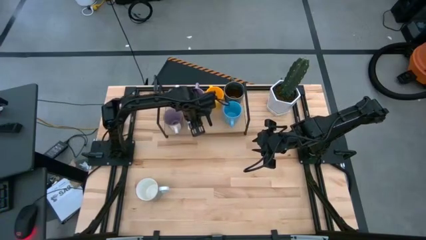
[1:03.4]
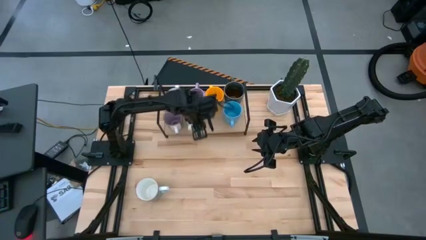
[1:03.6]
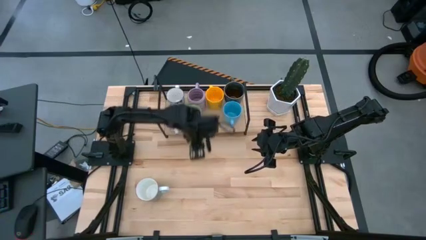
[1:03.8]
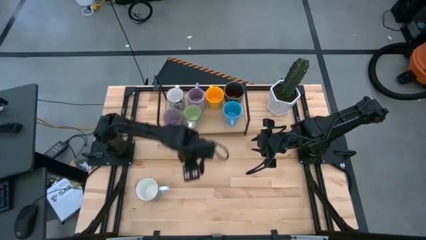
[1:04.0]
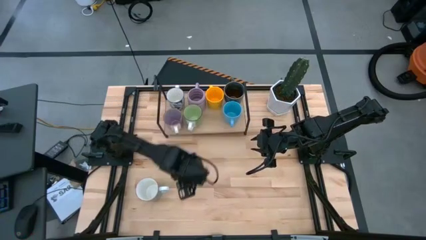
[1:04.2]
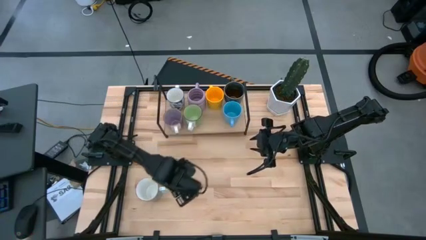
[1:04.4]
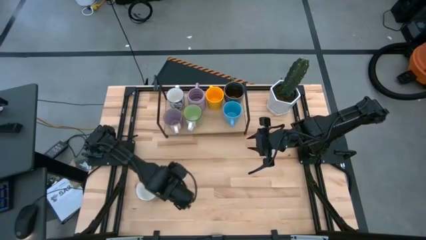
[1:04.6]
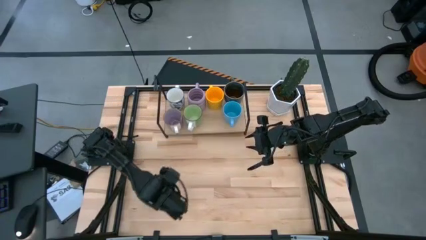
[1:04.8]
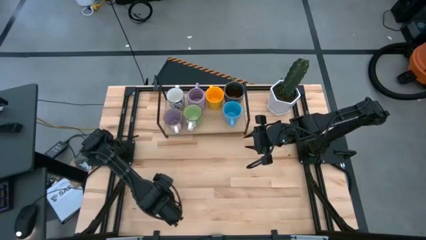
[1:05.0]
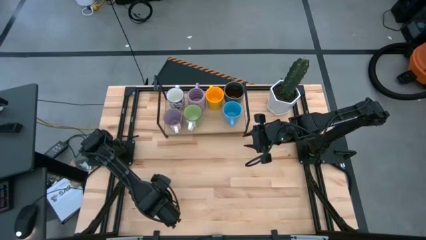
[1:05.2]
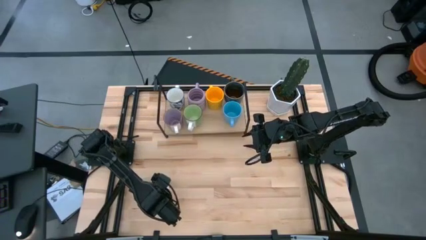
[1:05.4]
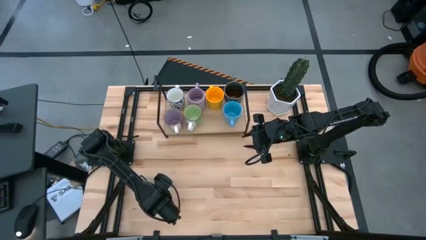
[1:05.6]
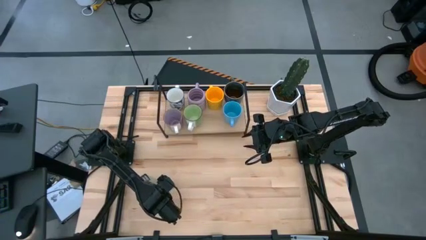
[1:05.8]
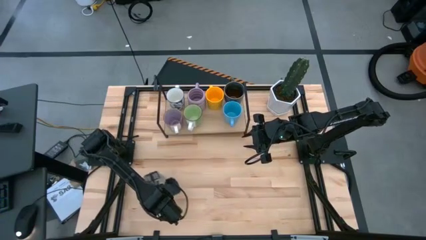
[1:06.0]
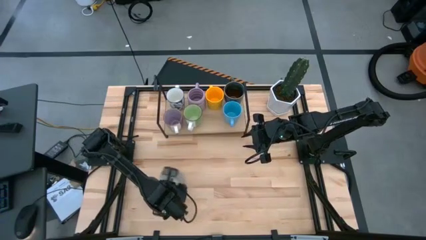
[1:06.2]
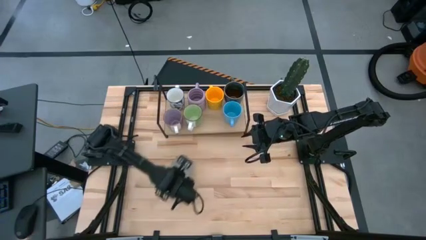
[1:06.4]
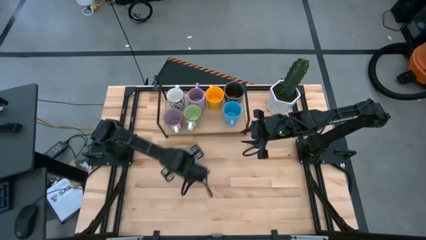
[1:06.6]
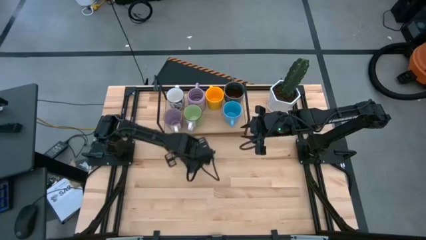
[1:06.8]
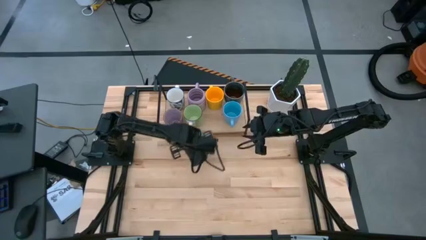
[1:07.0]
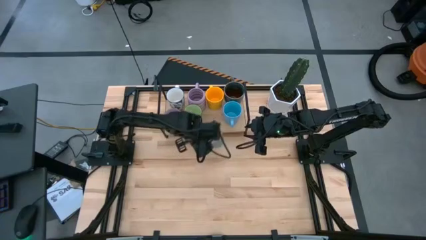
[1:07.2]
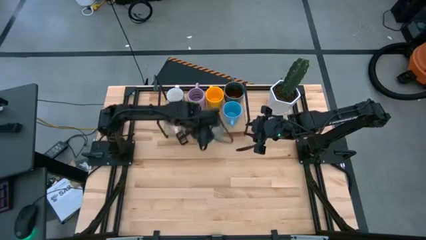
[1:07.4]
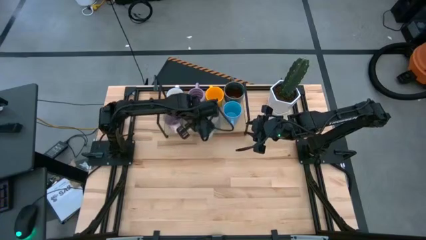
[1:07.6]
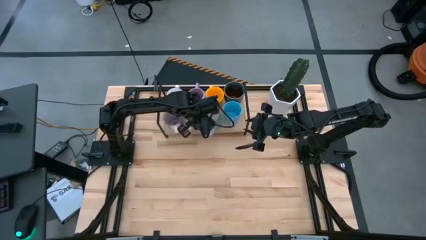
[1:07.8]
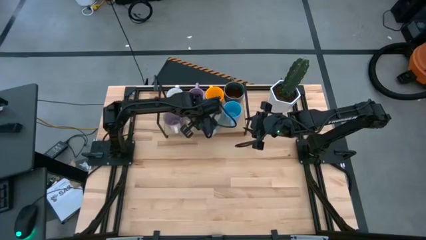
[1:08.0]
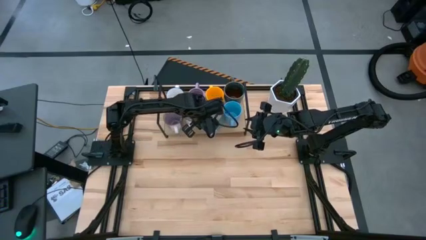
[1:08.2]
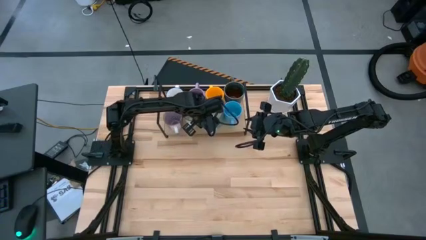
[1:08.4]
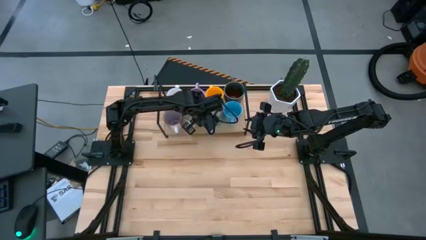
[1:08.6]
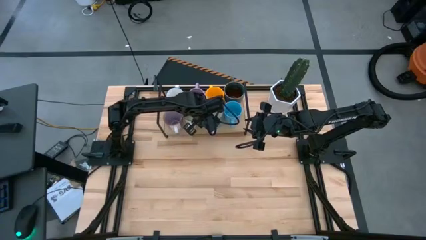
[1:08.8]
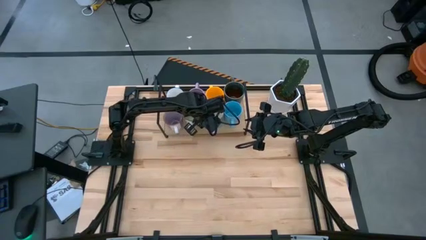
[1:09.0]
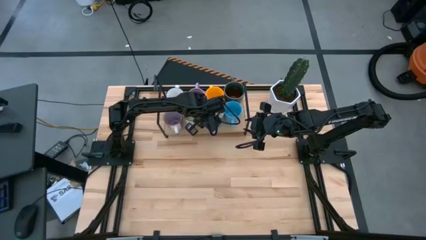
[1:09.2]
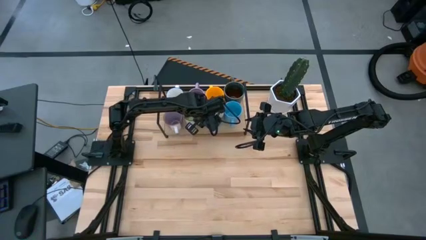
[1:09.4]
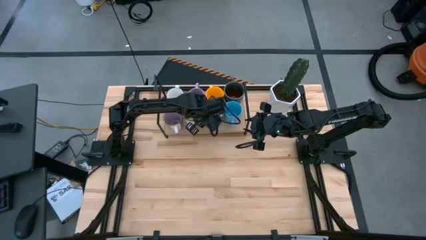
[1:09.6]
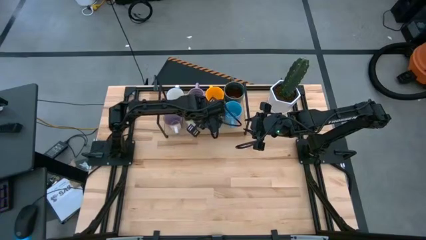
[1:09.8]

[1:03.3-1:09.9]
Task: Place coffee mugs
Put the blue and white mug on the shelf

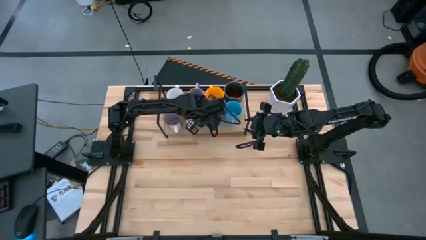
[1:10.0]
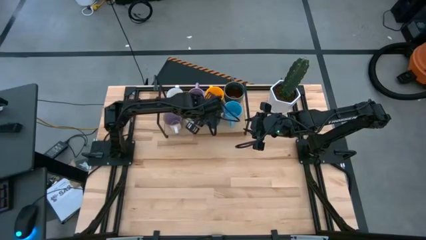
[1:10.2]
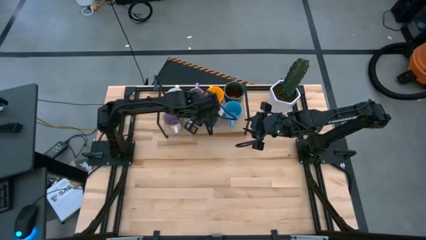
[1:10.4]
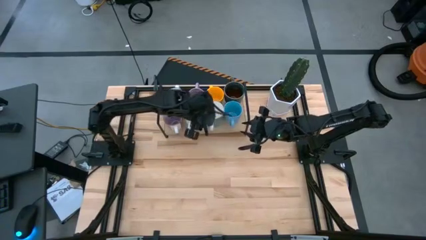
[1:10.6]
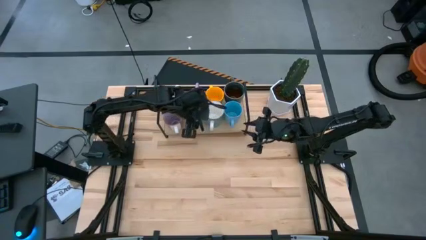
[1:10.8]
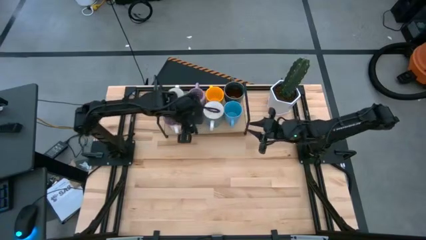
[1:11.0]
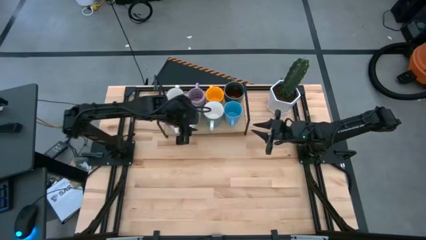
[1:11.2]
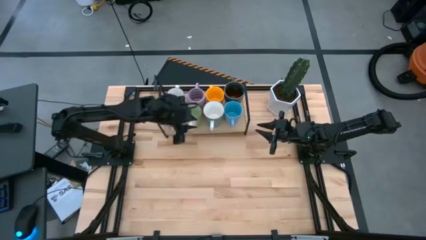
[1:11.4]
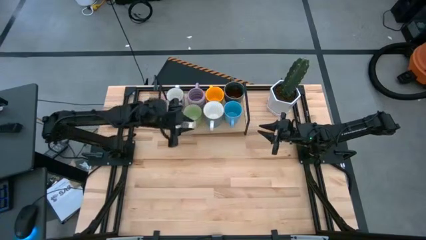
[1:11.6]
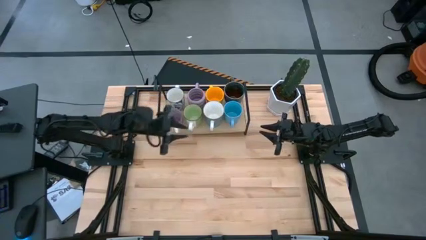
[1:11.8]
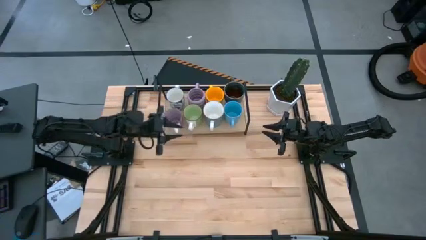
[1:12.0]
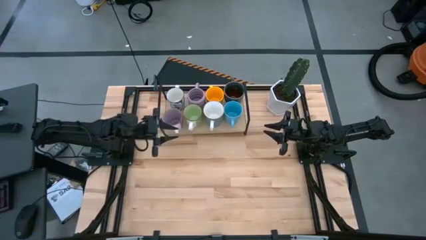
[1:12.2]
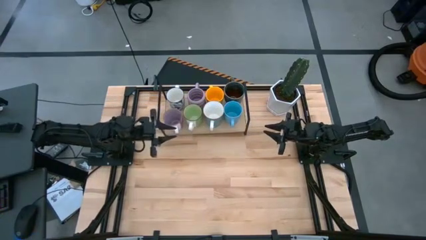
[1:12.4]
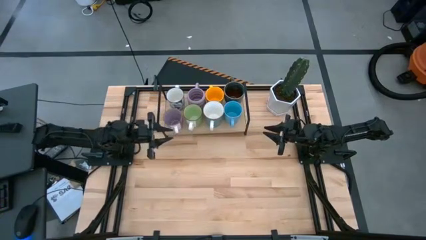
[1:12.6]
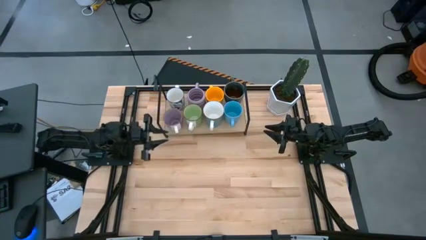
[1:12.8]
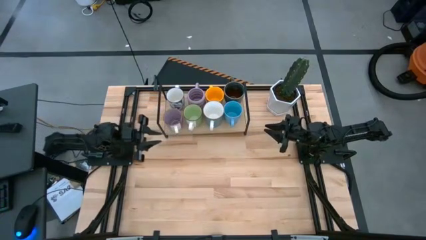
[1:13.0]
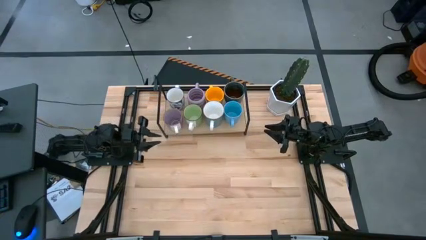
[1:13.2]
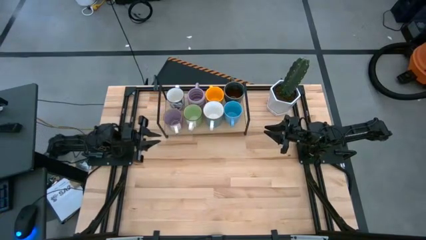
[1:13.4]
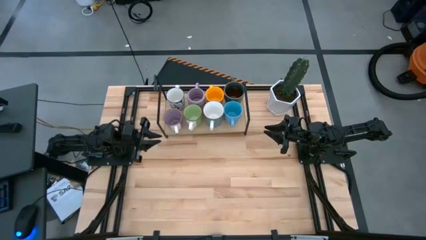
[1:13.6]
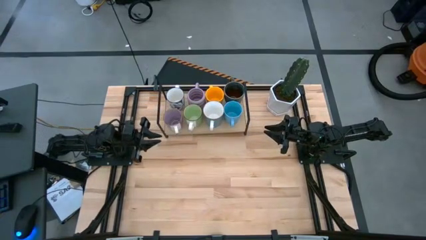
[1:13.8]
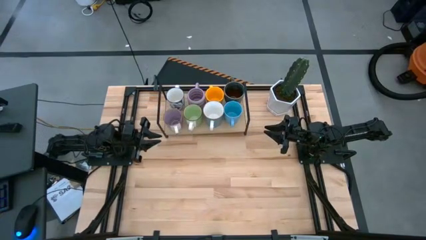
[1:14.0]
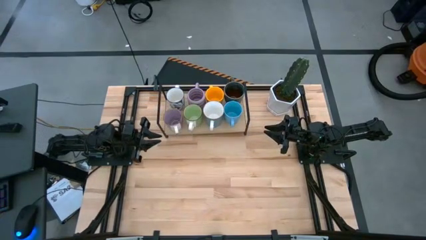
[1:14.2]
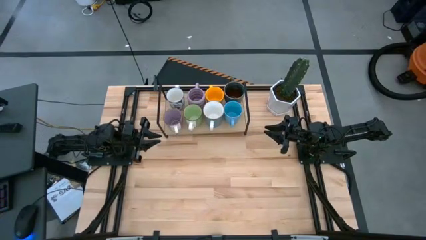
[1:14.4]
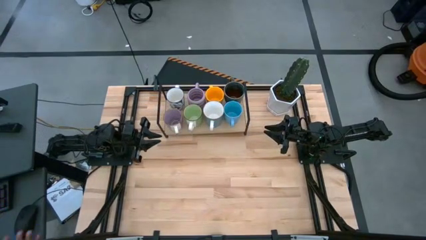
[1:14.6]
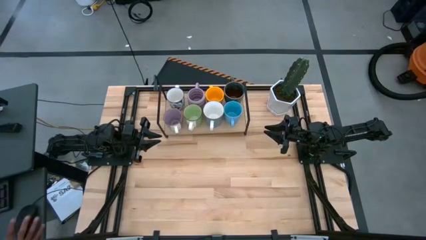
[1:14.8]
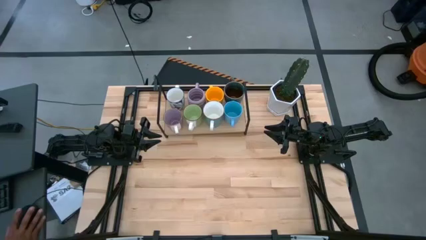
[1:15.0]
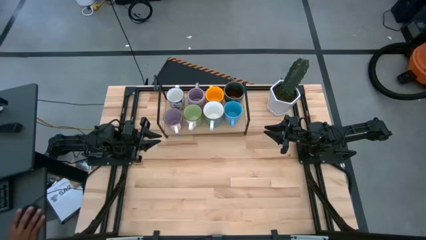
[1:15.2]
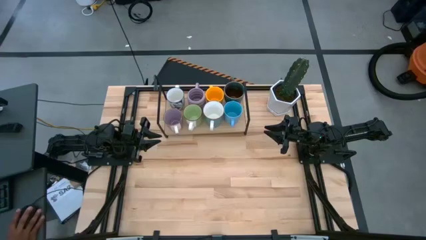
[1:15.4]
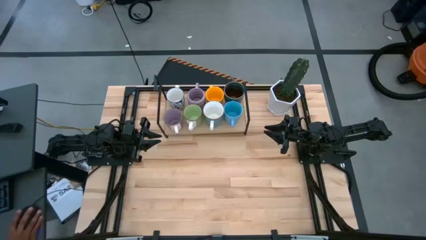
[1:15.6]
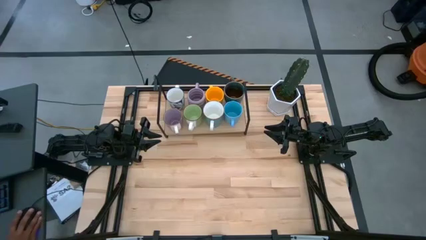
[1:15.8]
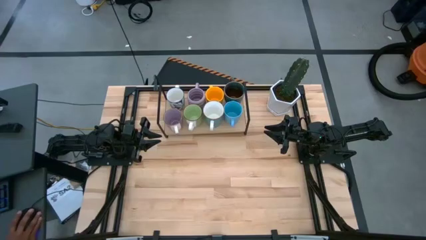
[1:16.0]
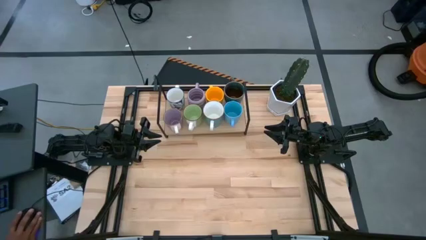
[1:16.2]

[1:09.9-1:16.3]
Return to Home Position
